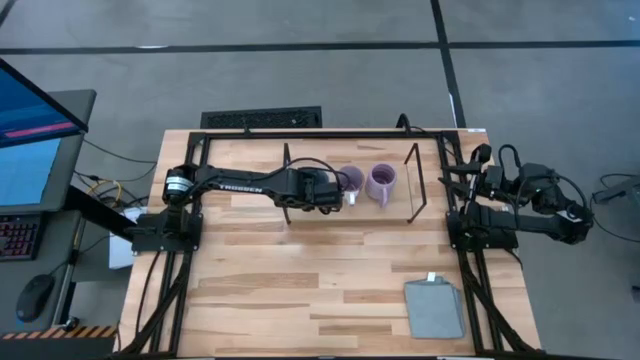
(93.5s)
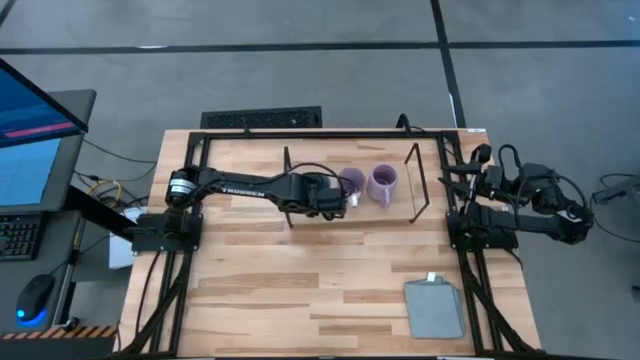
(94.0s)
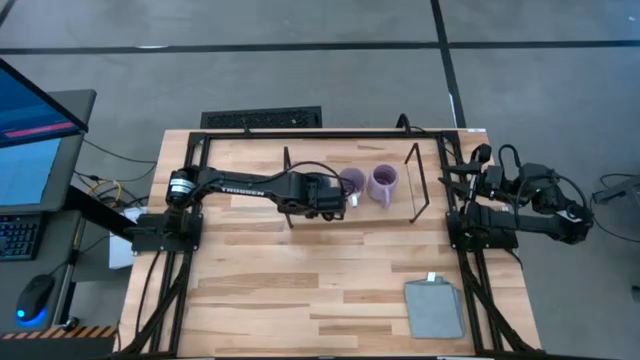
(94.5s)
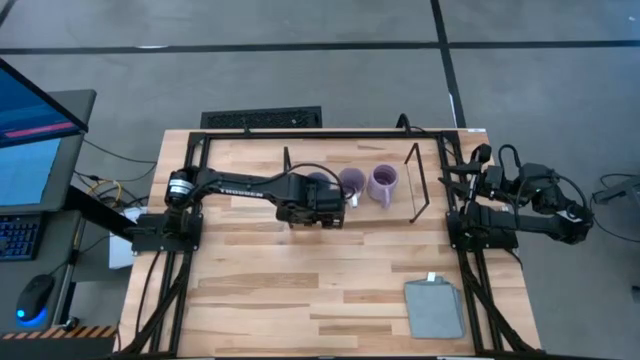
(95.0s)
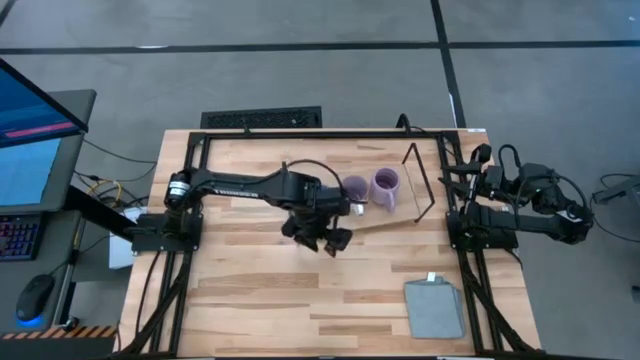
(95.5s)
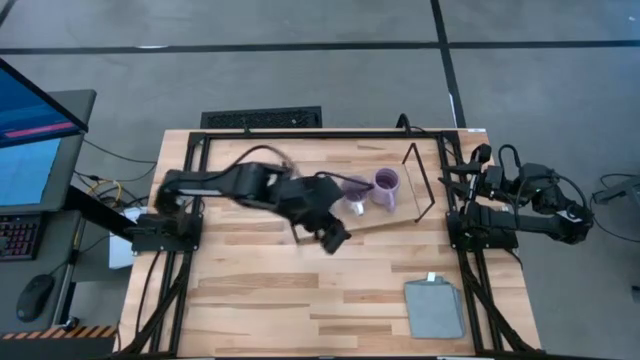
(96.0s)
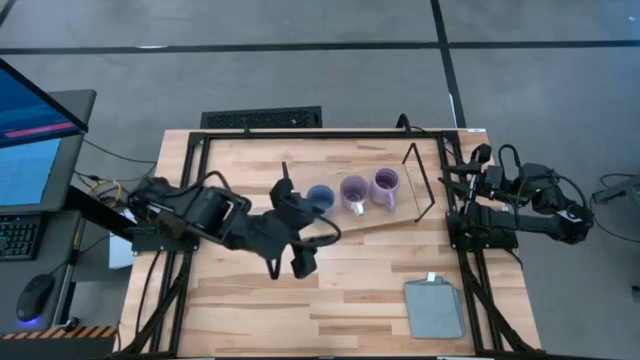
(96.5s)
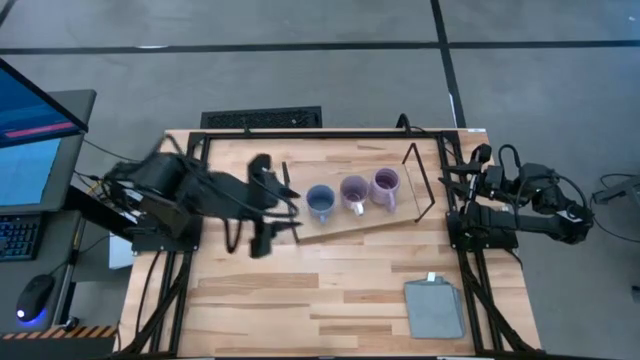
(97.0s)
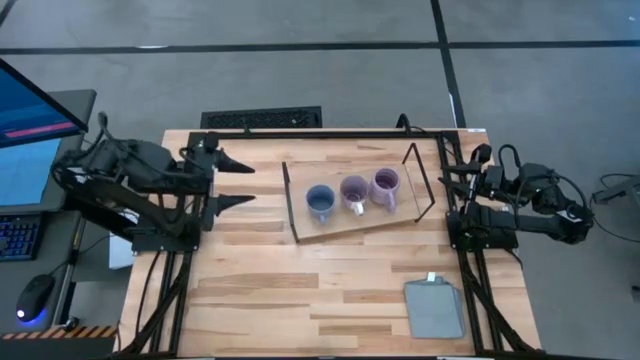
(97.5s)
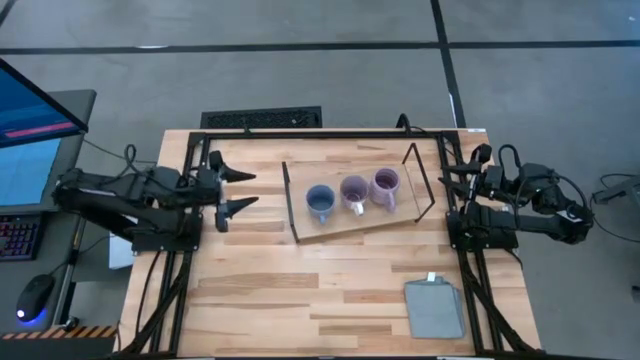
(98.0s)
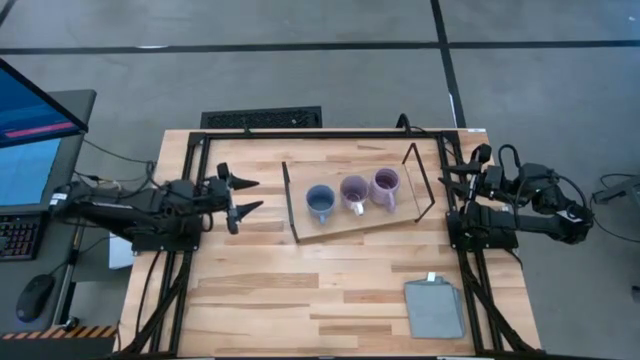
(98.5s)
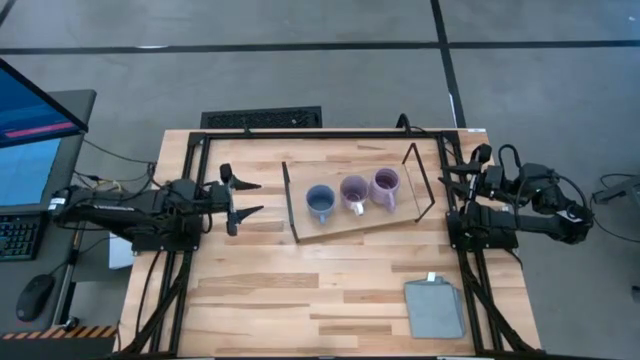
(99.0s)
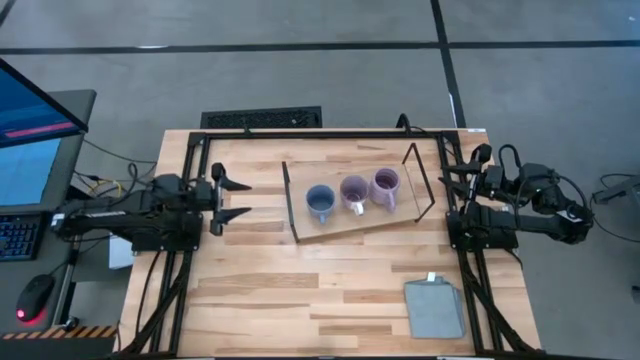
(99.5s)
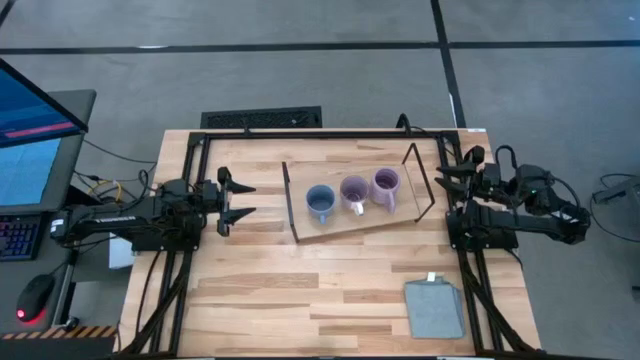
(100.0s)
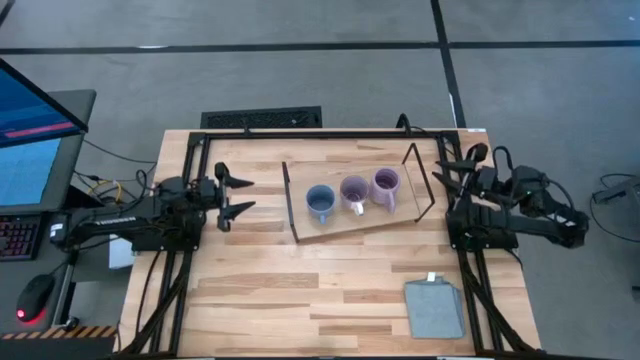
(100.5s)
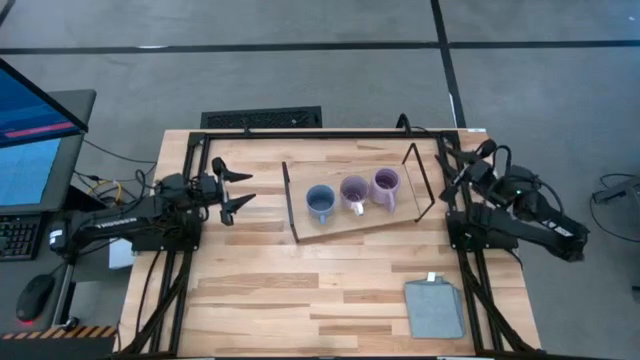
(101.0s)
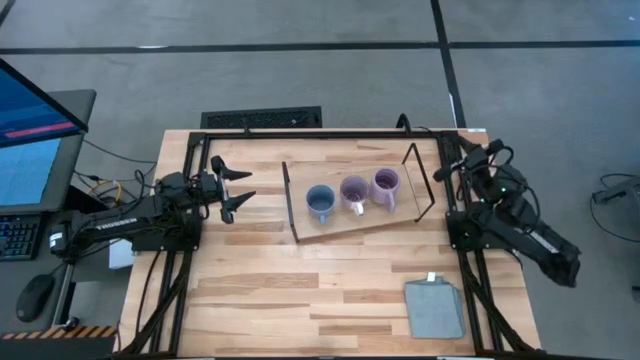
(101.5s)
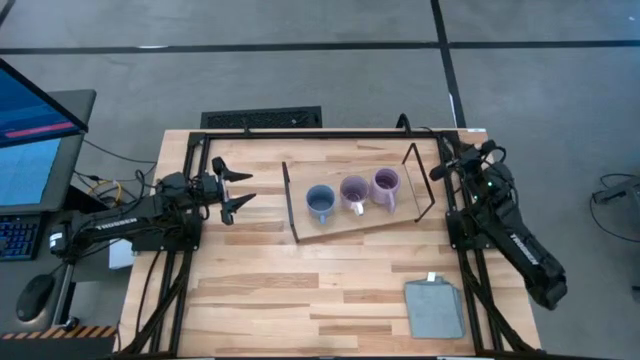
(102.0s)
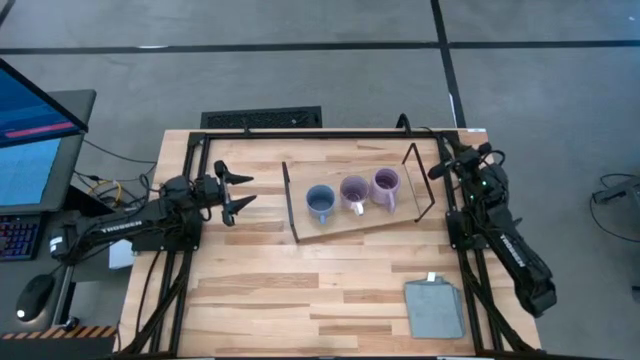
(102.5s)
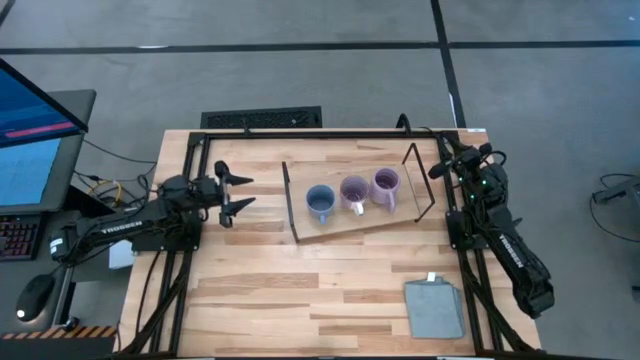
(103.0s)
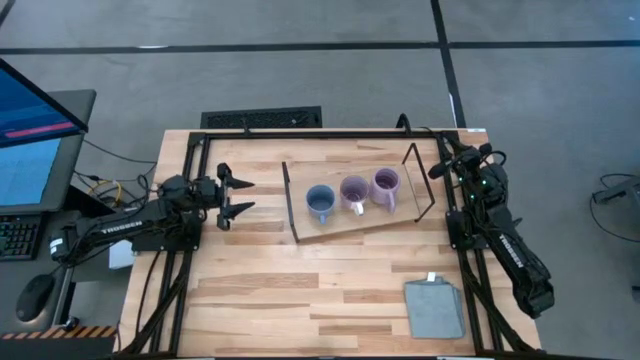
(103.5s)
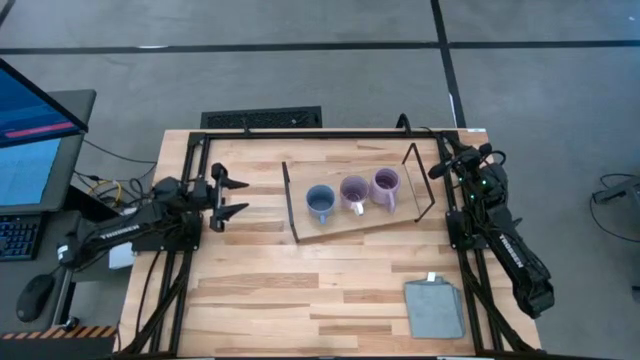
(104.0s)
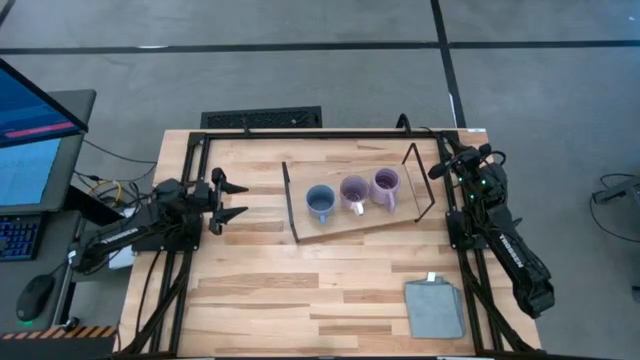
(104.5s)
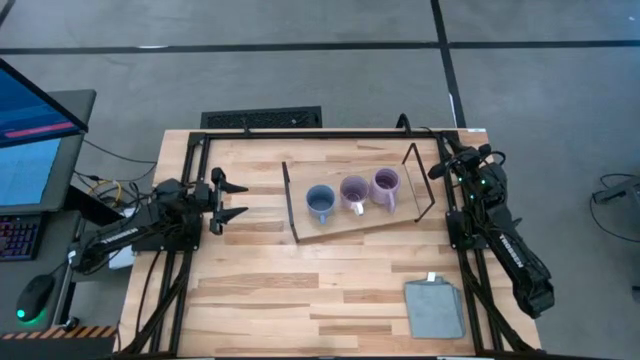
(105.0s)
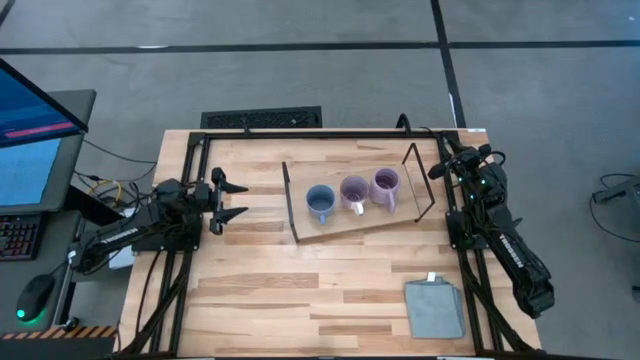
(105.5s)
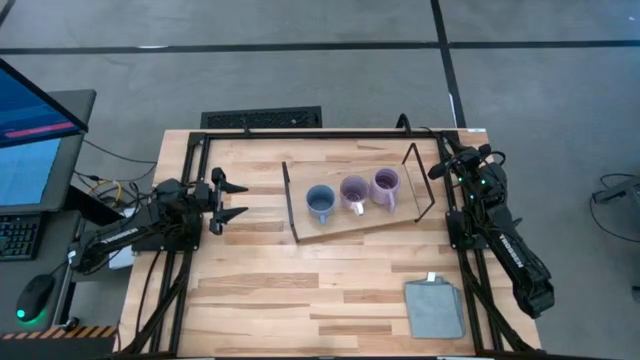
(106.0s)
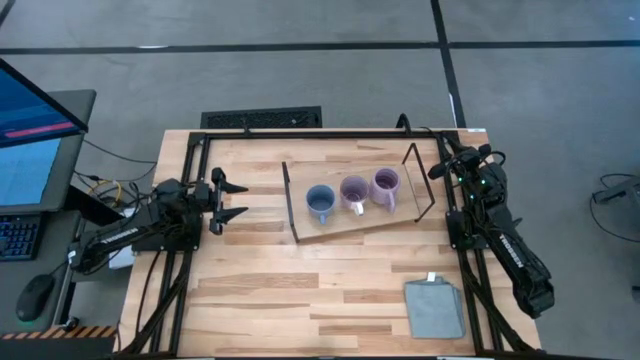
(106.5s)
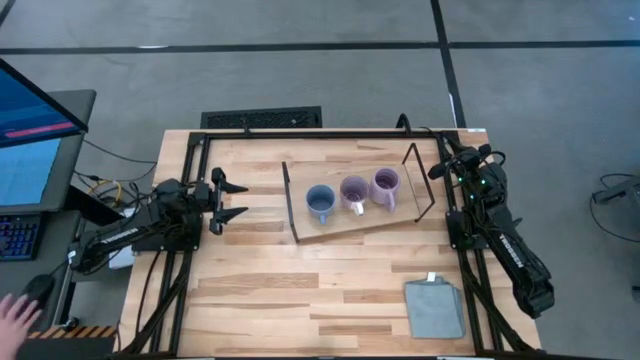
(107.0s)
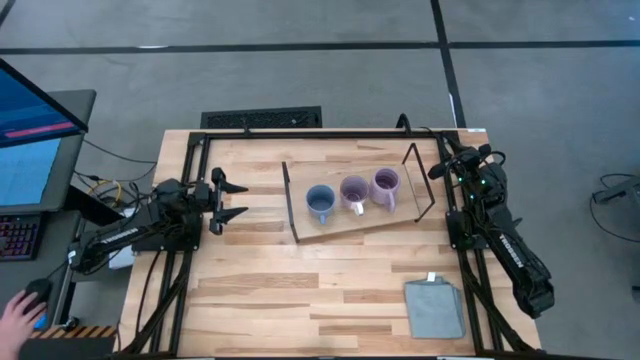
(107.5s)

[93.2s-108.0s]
Task: Stack small to large cups/mugs on shelf
Return to Home Position

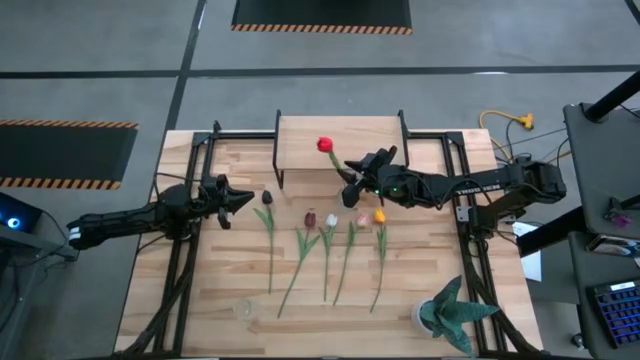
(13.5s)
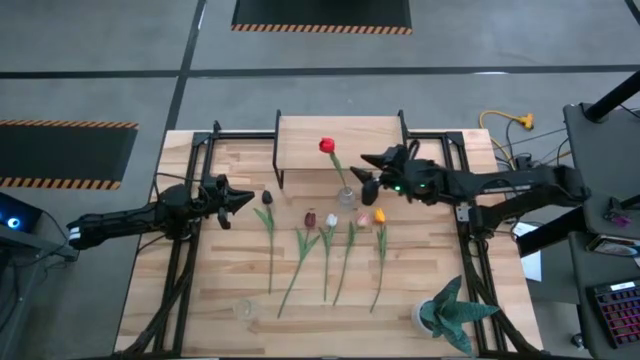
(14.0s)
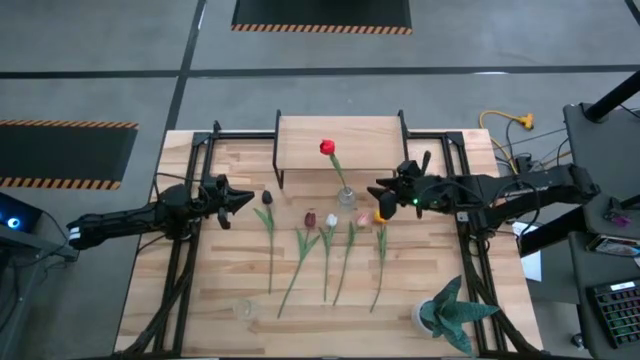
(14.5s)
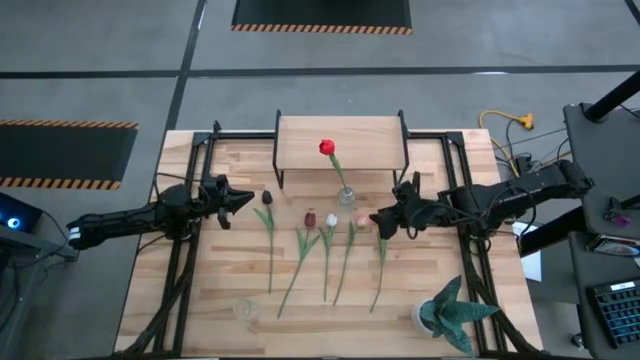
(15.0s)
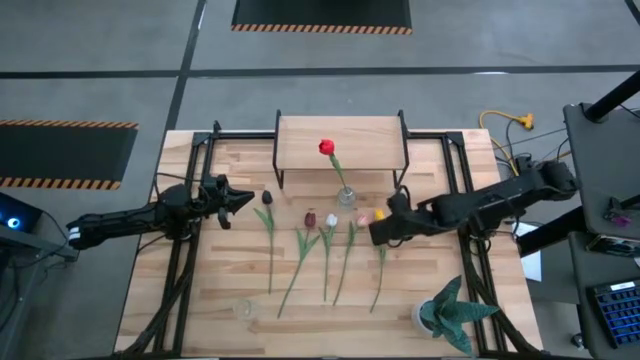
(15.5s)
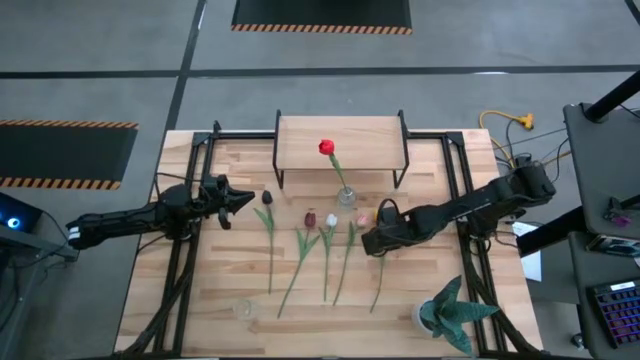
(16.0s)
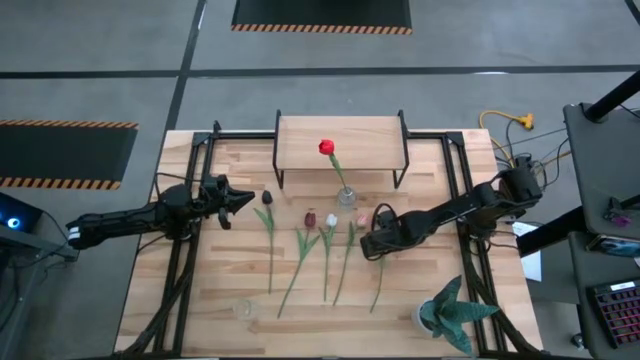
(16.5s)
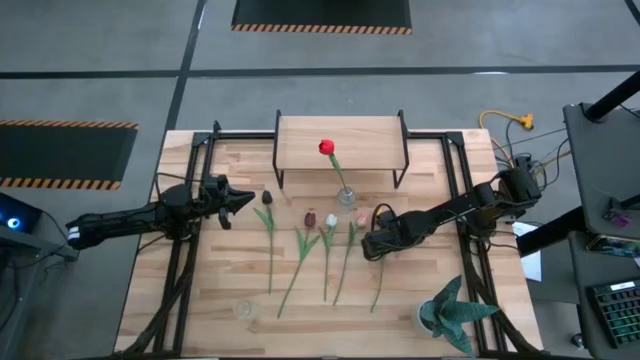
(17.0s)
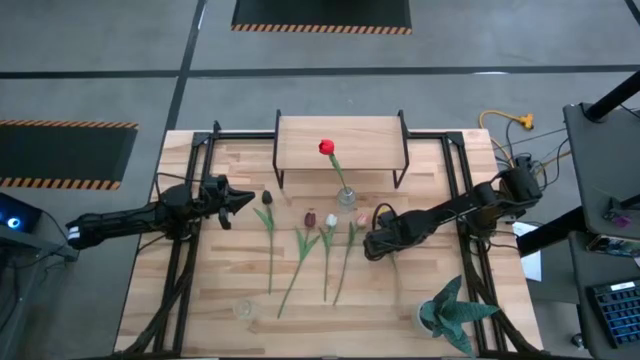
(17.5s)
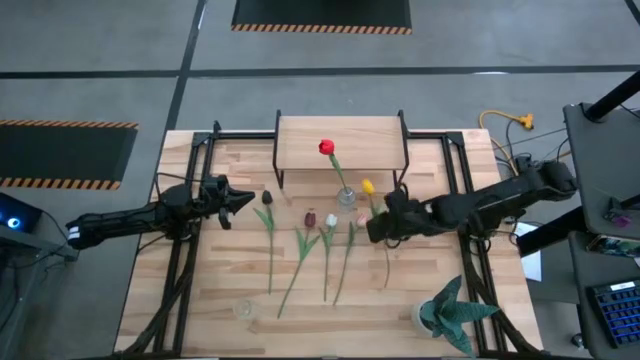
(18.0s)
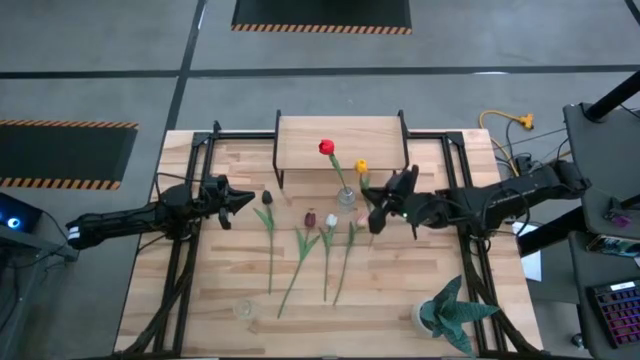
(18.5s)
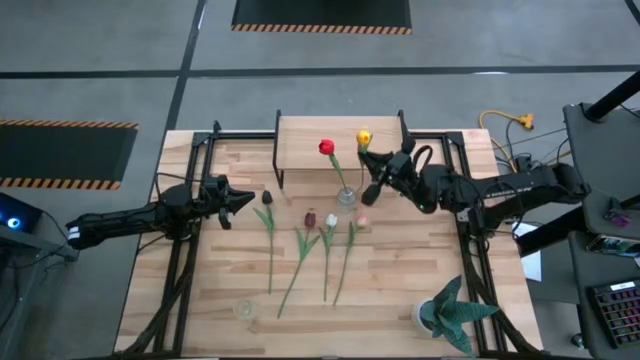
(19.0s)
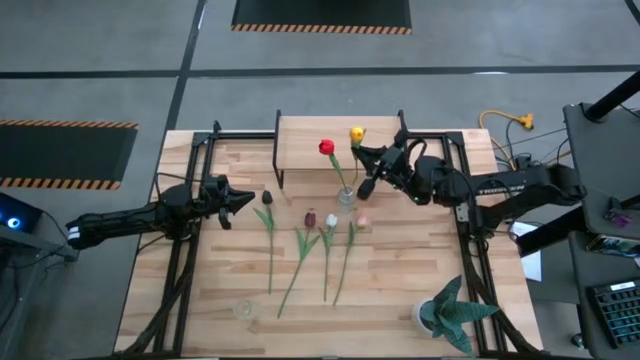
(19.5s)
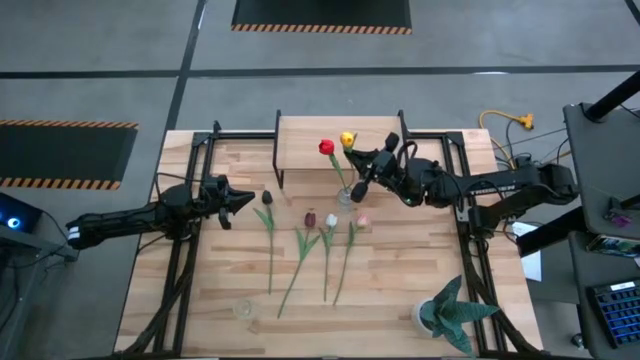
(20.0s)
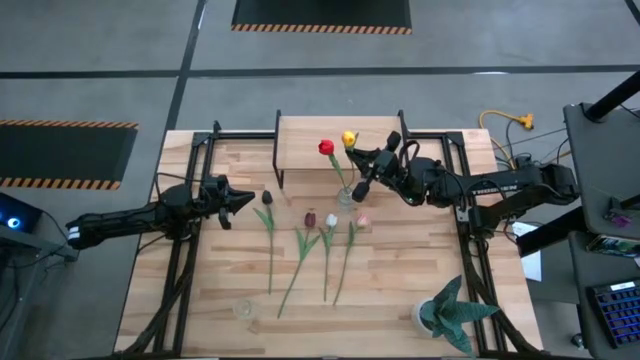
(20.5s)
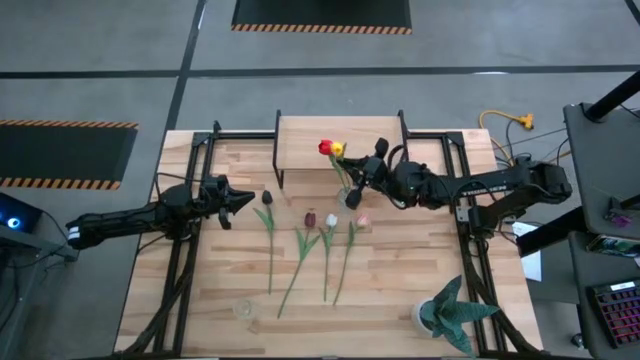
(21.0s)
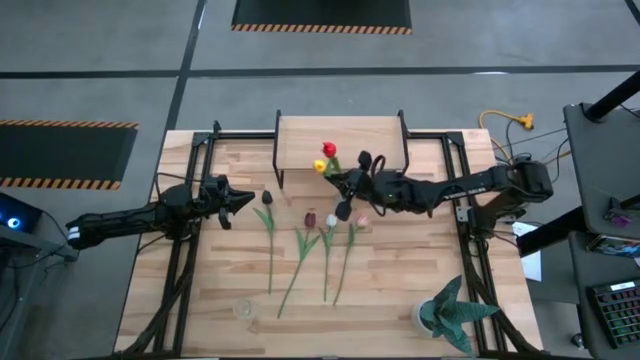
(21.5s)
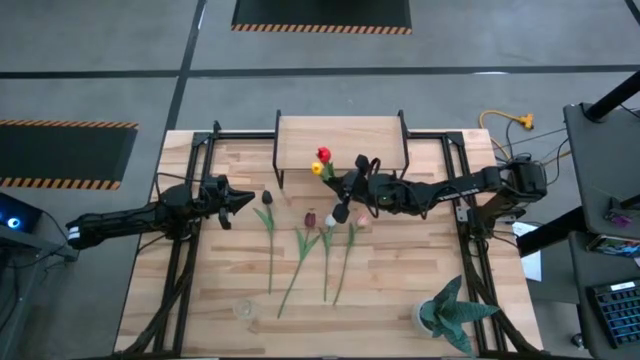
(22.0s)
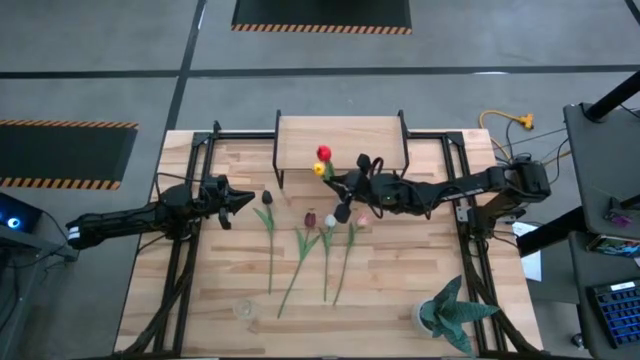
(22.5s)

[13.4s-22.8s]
Task: Pick and place flowers into a vace then onto a shelf
Put the yellow flower into the top transparent vase
